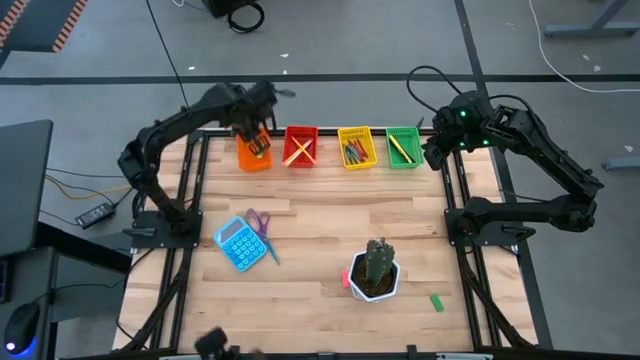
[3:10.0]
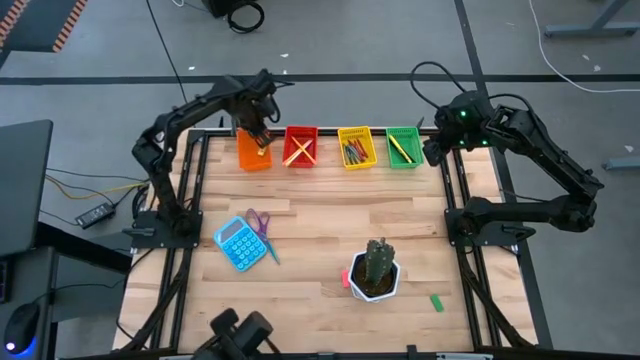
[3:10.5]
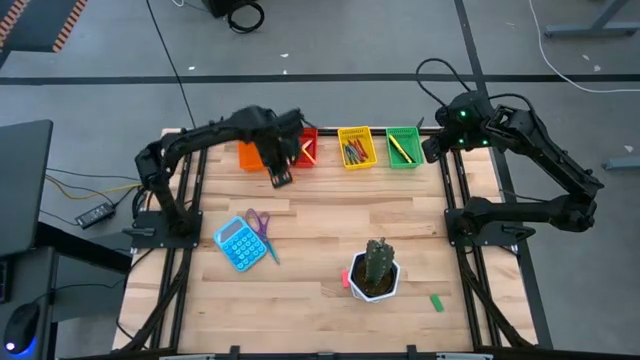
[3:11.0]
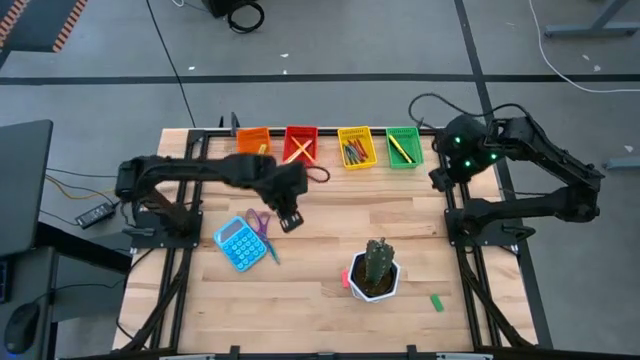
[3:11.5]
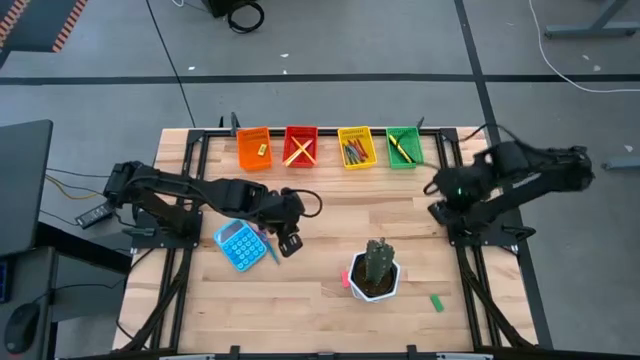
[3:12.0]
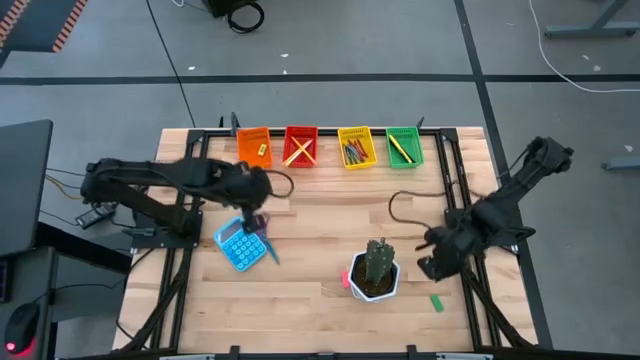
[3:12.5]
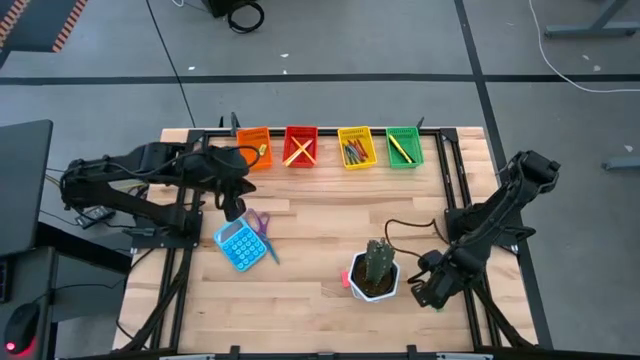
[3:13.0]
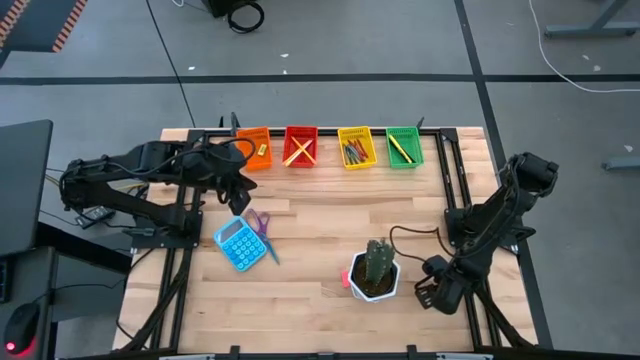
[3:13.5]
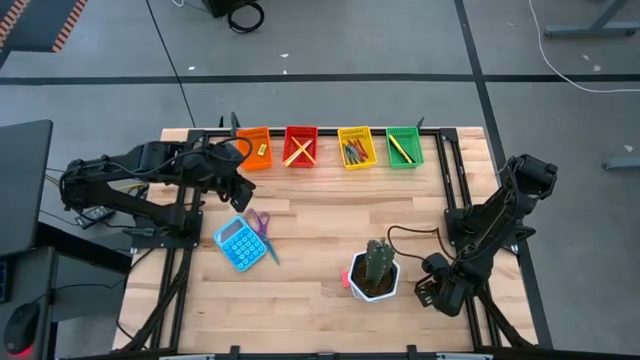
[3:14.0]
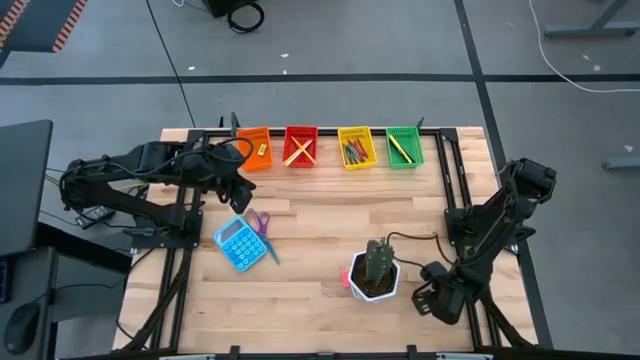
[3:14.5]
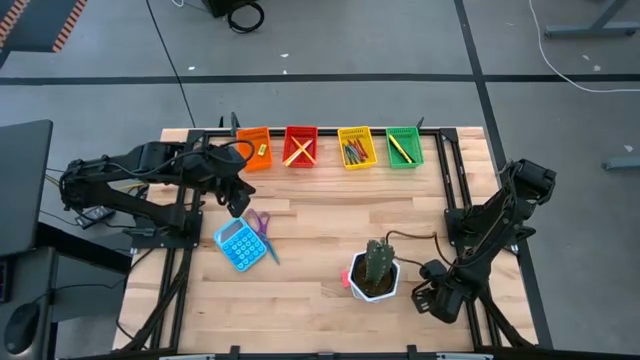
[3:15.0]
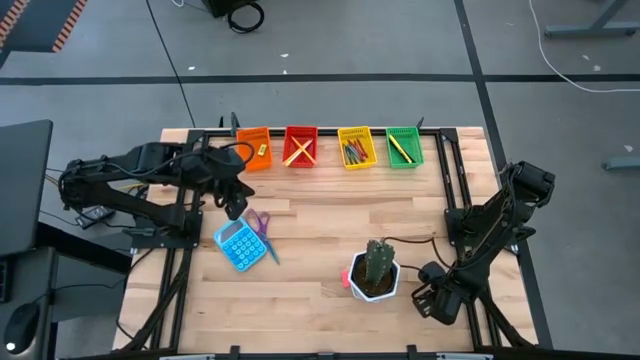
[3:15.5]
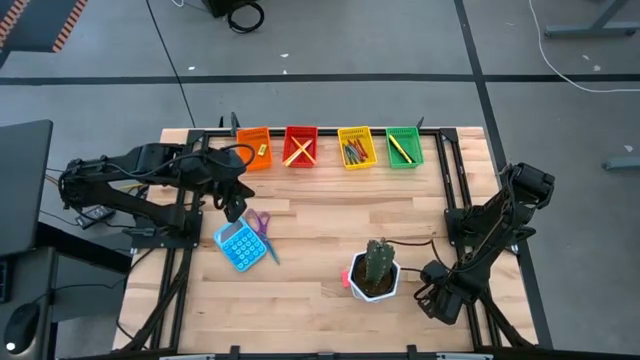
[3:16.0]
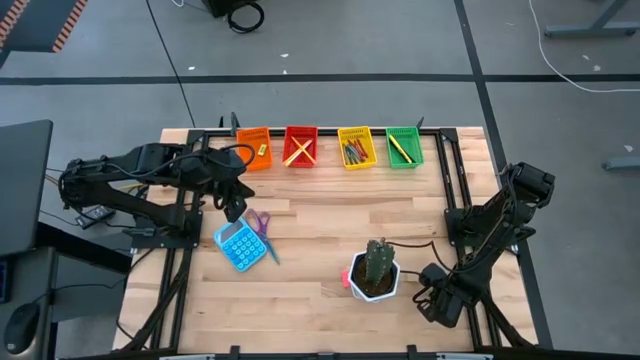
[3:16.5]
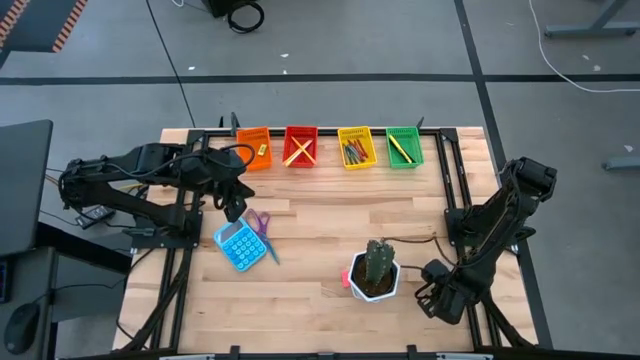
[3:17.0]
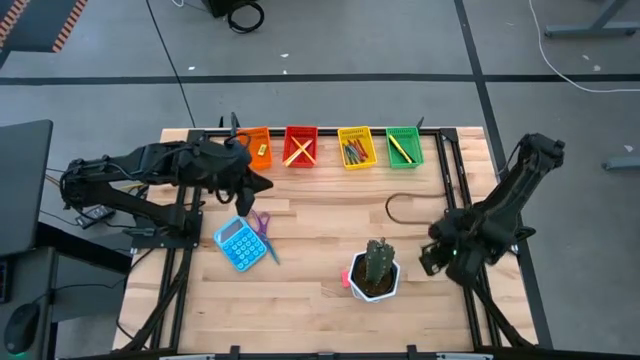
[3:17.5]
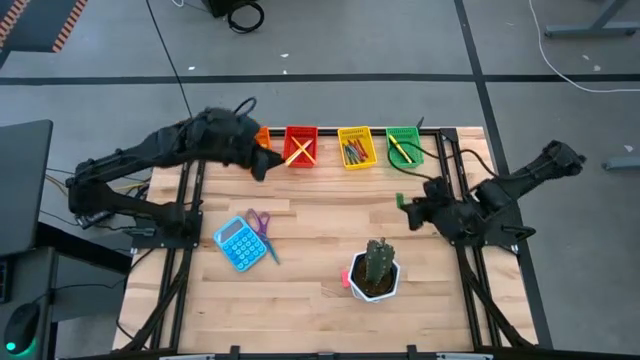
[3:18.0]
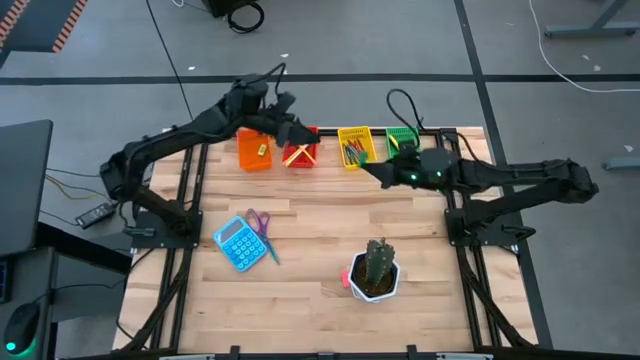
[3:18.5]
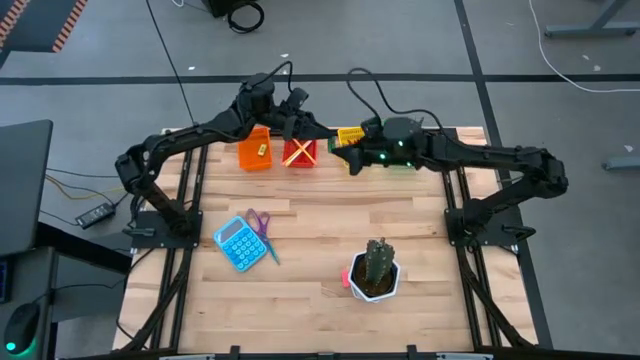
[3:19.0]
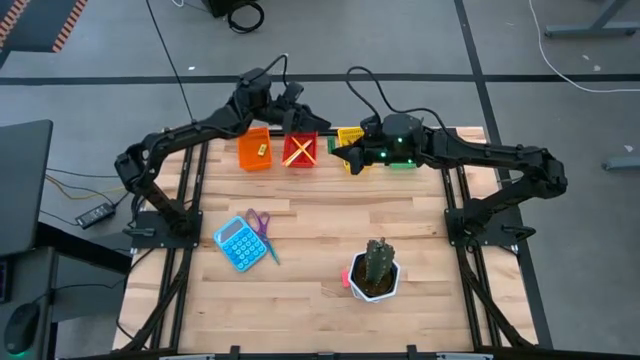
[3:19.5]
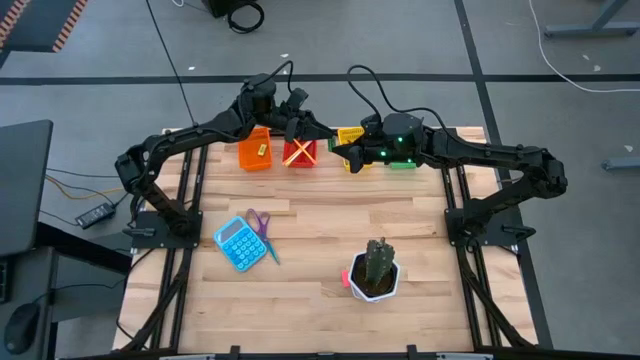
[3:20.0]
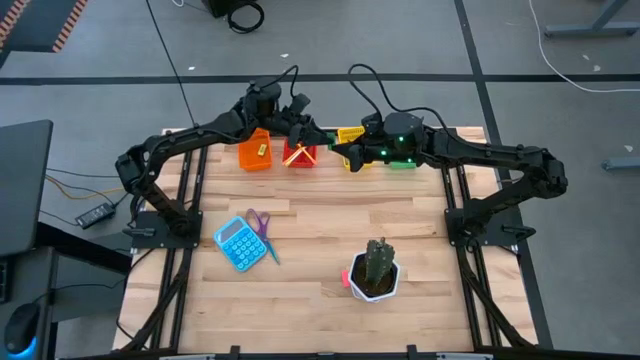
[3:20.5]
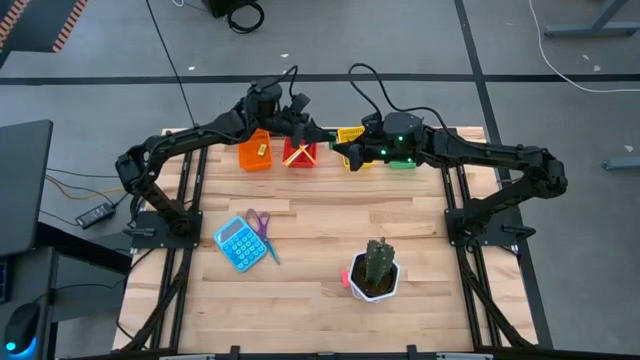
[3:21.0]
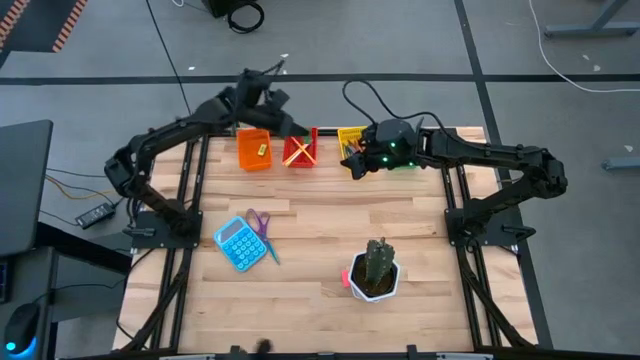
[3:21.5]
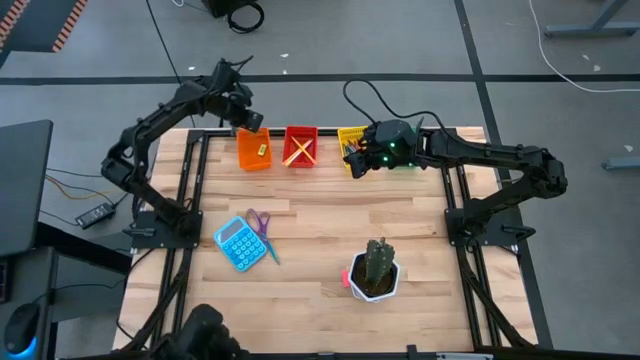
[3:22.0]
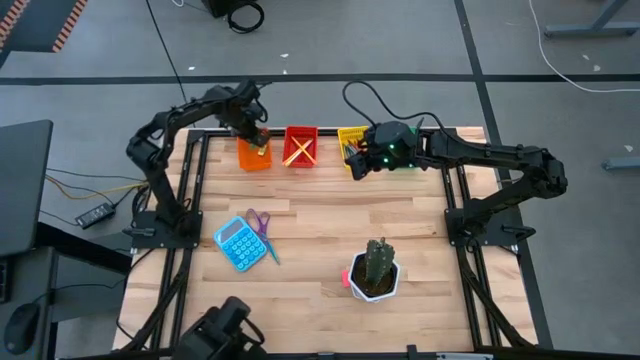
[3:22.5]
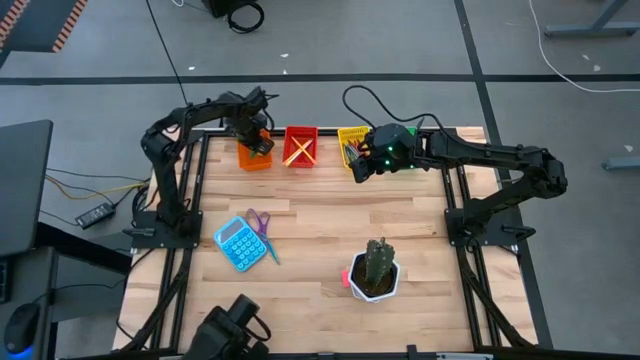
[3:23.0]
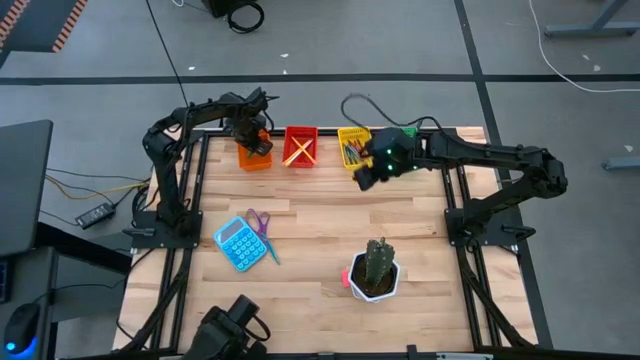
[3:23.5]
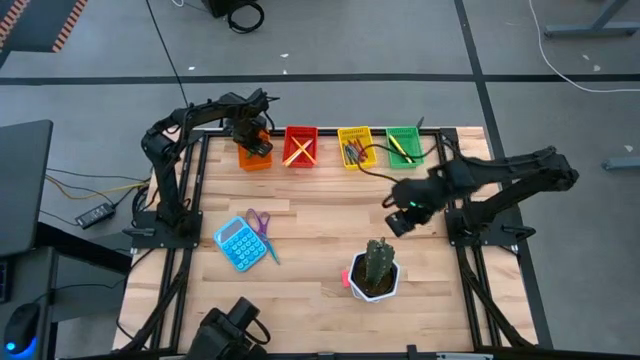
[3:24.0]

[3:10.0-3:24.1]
Task: Sort crayons/erasers/pens/pencils in bins
Put the green eraser into the orange bin

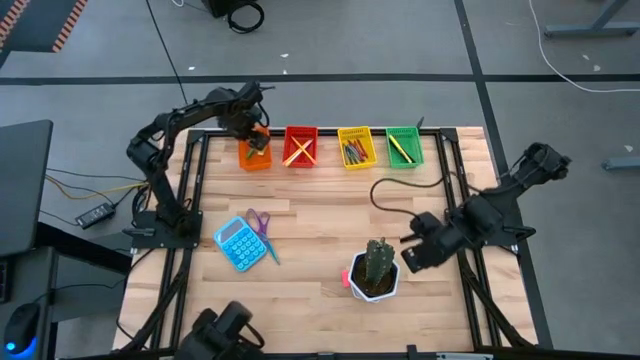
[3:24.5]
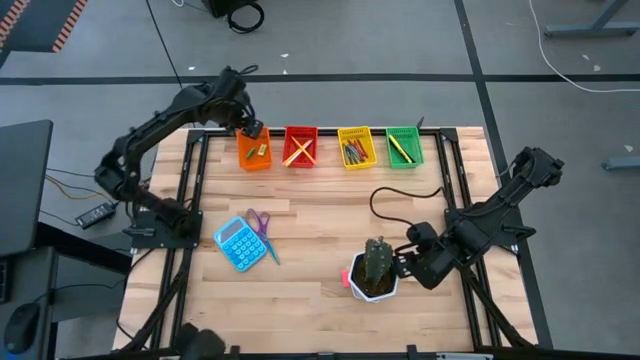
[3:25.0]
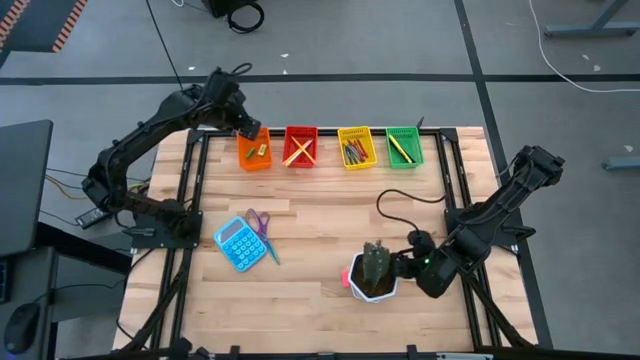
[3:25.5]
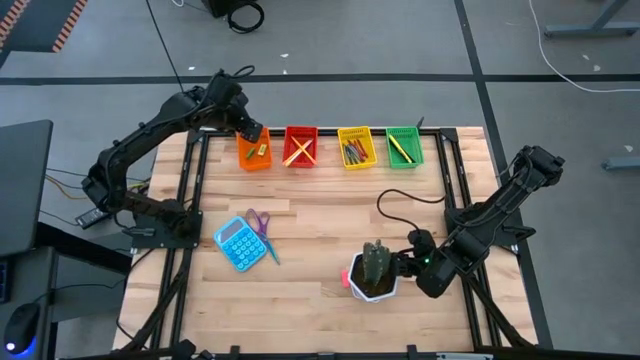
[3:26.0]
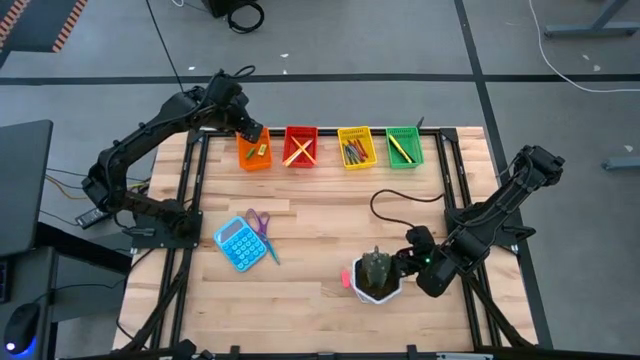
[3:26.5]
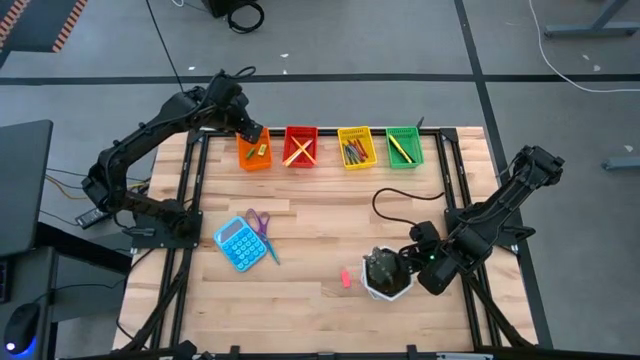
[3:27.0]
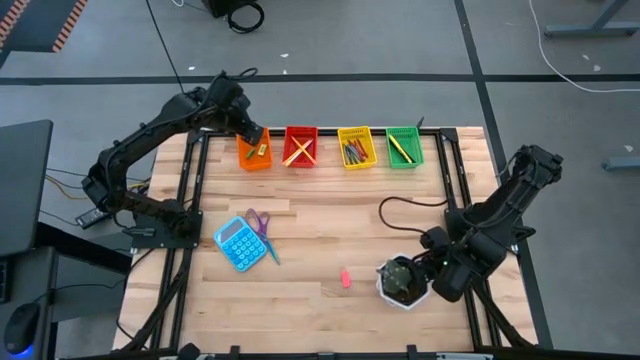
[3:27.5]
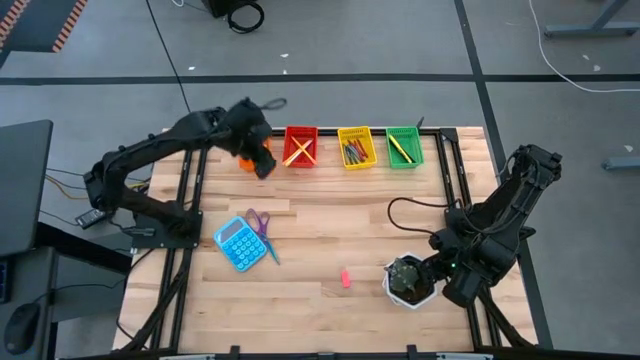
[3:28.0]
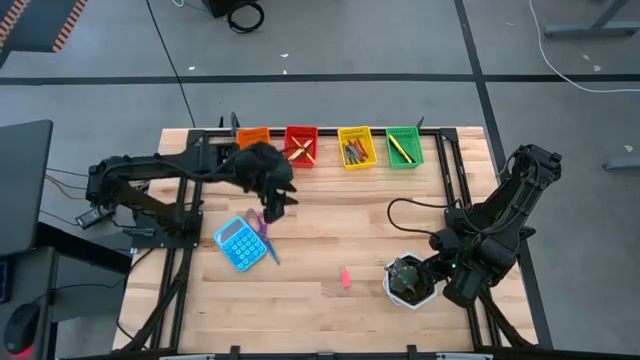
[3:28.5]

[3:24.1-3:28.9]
Adjust the plant pot
